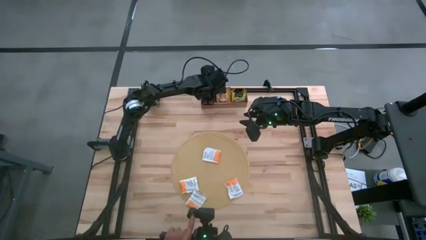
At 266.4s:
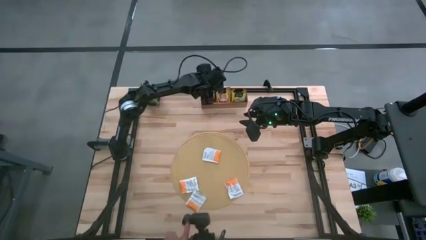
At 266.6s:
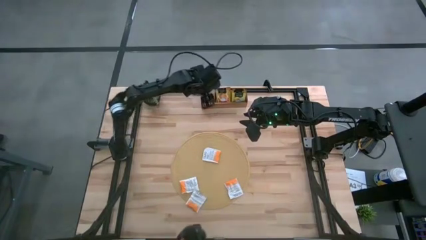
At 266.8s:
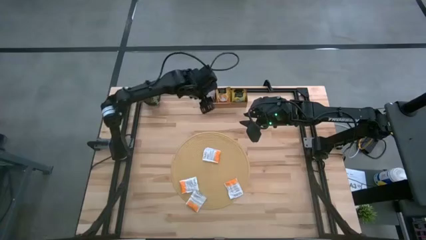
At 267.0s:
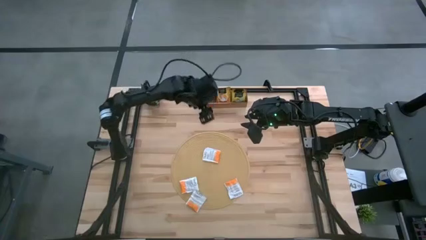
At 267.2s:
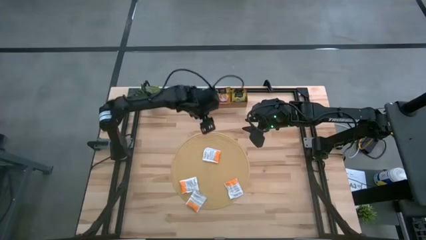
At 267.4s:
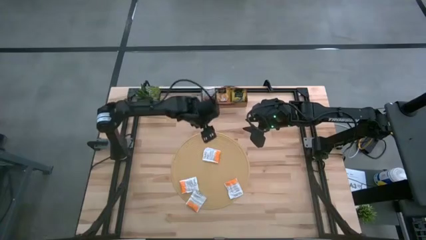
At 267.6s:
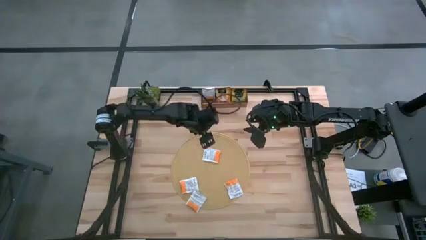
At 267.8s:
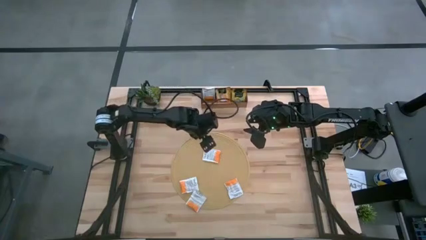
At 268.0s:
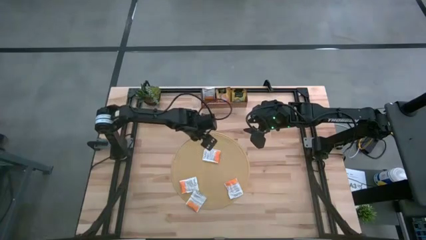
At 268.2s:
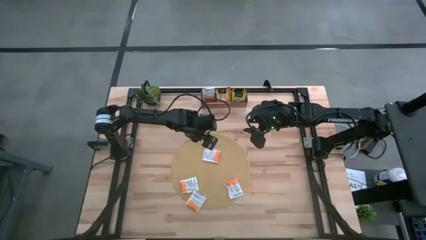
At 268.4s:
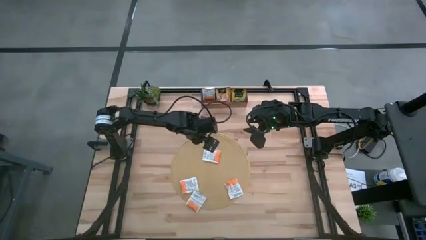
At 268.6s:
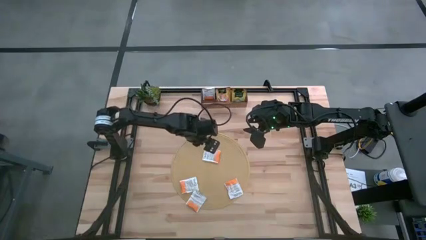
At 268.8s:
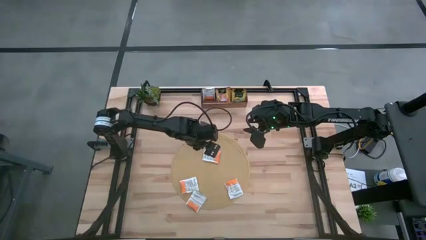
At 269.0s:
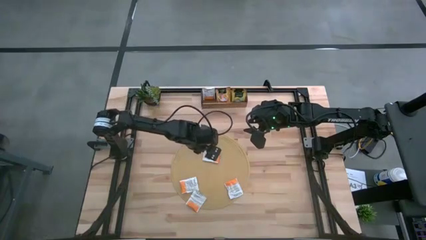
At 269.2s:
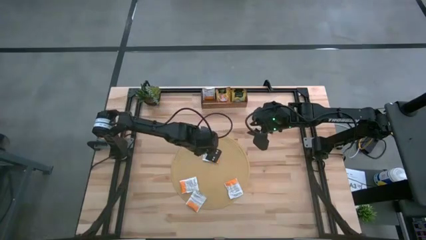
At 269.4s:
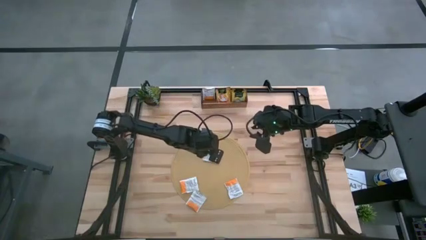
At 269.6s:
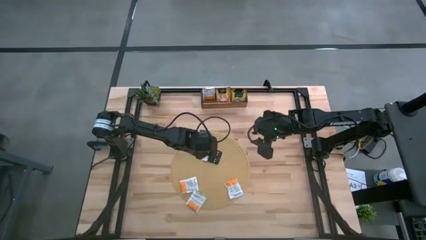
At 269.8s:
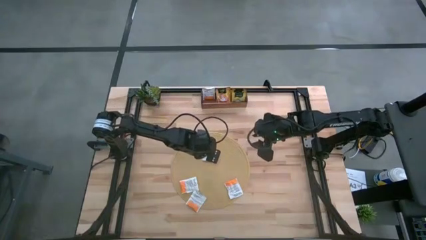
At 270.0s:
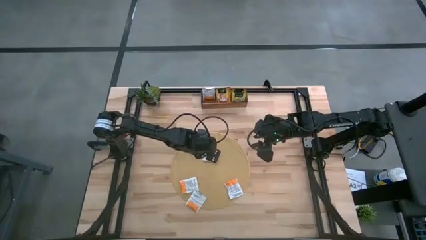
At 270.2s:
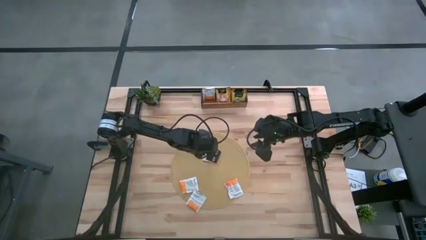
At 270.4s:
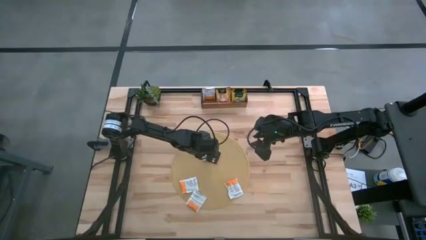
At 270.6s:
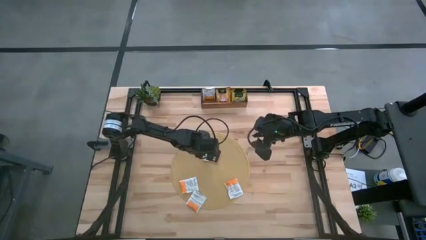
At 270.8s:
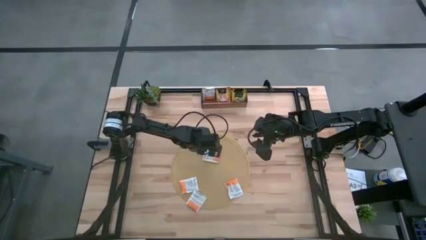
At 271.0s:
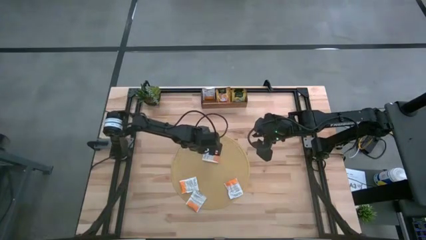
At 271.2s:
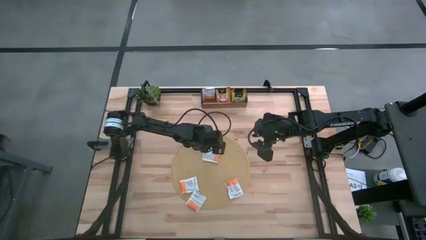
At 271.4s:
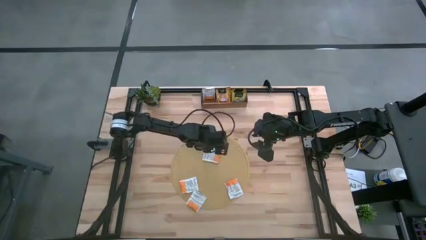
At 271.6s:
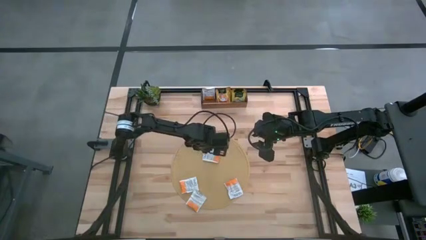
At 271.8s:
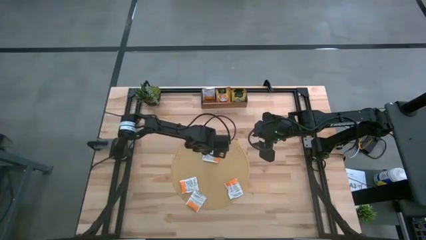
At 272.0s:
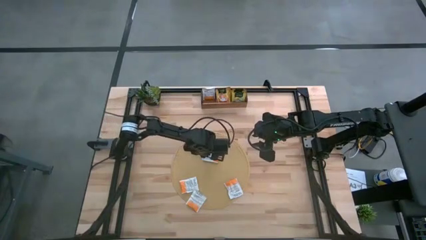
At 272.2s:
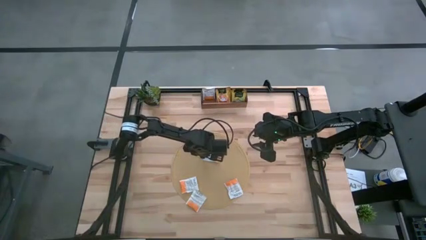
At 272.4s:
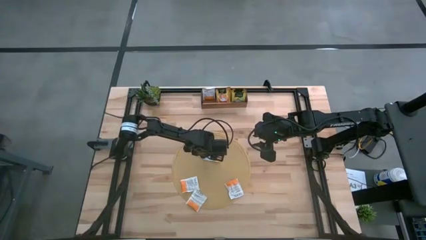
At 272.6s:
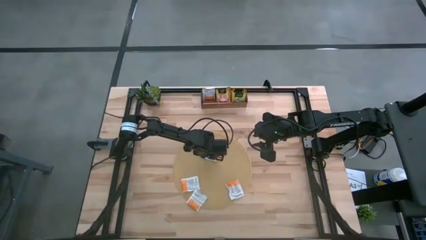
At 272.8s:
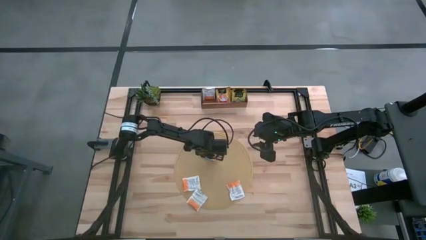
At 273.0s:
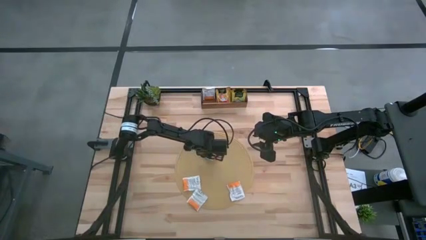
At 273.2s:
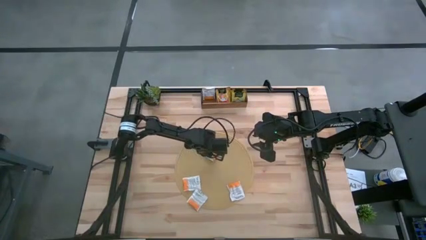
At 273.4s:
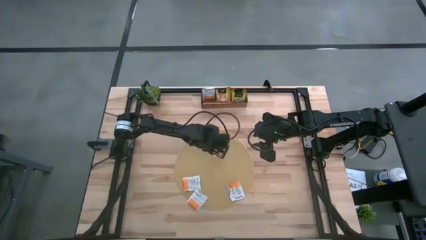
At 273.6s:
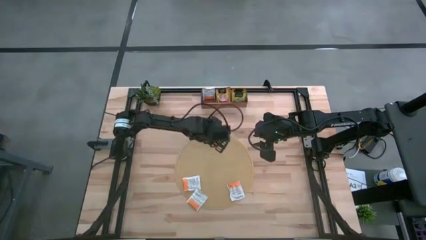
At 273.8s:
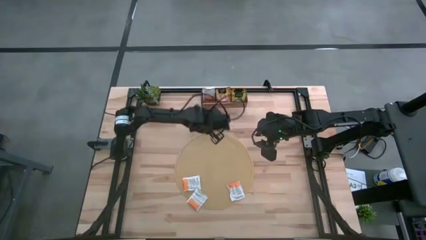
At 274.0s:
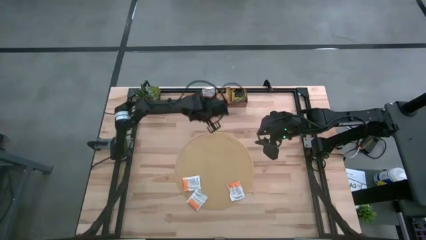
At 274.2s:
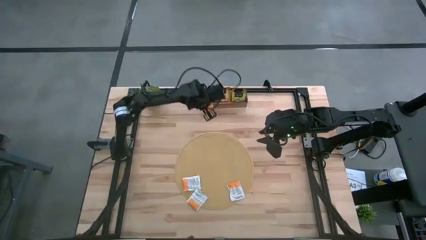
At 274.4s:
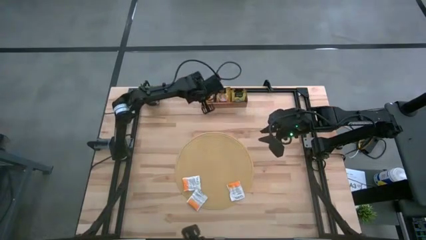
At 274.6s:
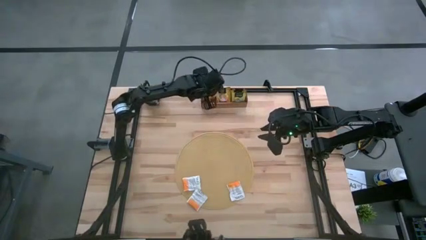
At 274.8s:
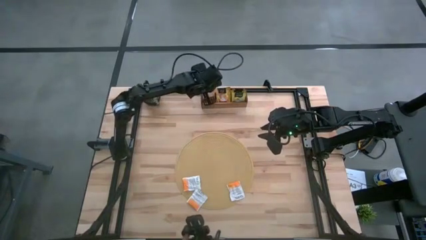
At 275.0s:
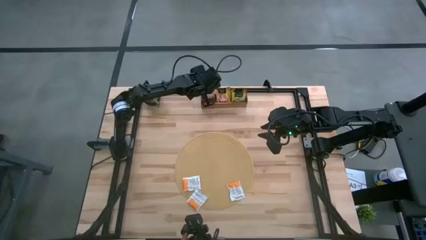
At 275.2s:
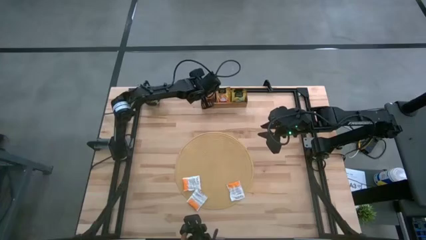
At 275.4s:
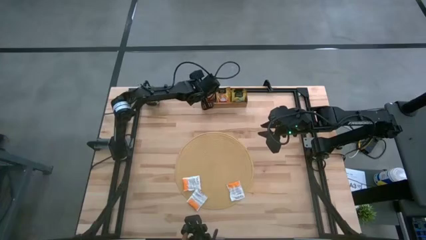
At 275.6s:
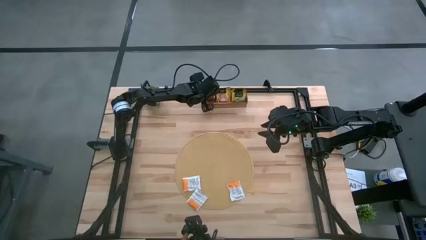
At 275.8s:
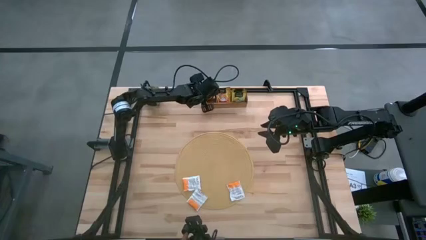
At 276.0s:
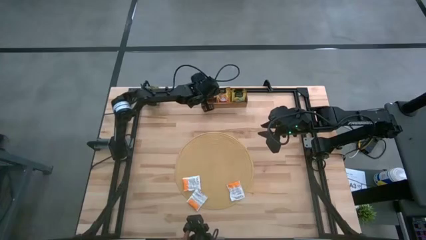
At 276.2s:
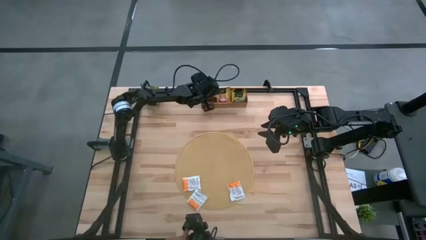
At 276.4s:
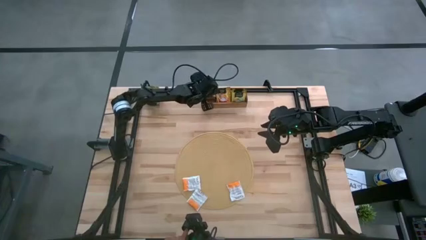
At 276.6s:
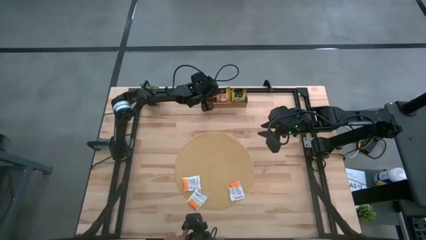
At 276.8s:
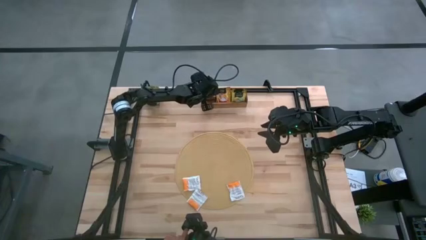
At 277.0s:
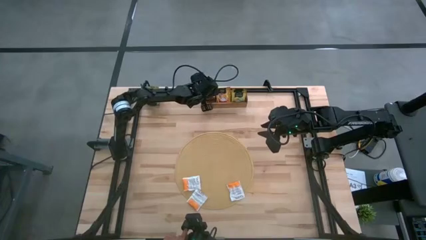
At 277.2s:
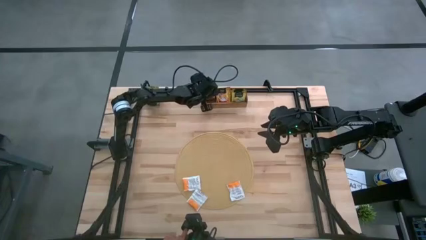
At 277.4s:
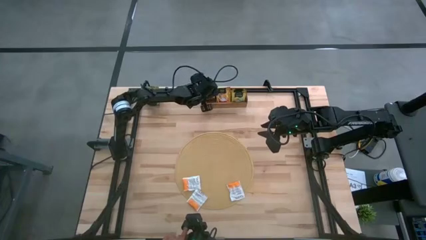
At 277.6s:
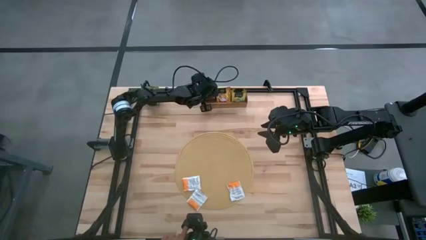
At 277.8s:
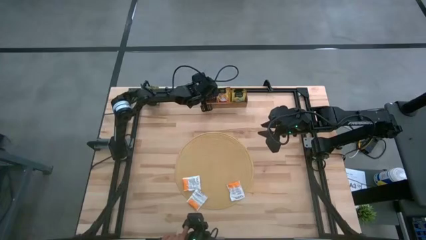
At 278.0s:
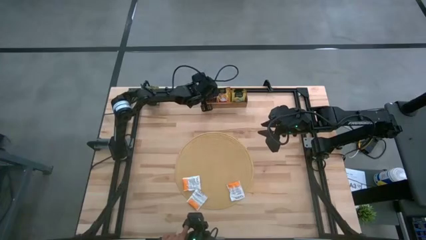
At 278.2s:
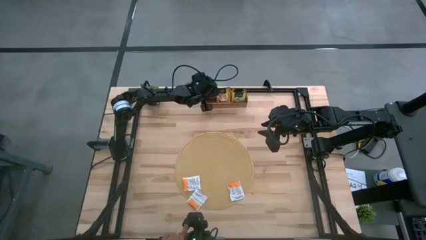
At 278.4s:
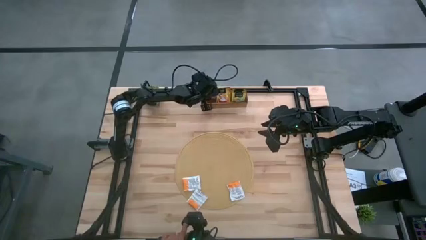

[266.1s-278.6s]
Task: Pick & Place Tea
Put the orange tea bag into the left section of the wooden organizer

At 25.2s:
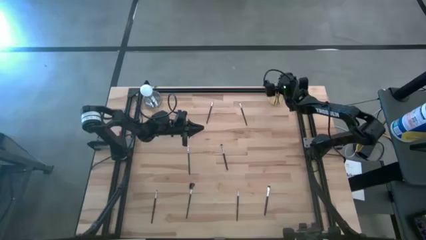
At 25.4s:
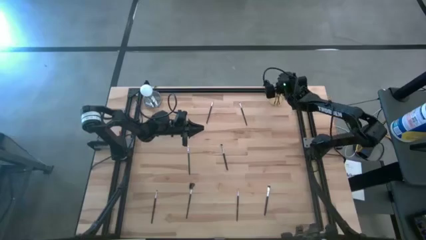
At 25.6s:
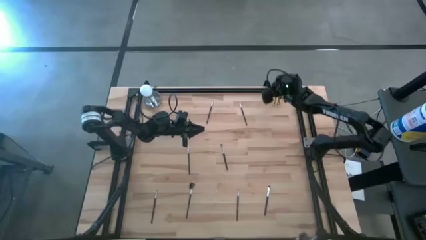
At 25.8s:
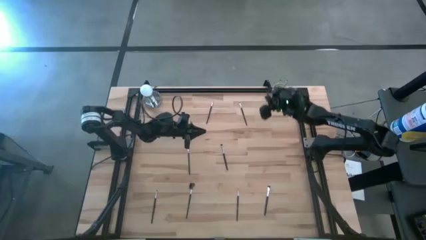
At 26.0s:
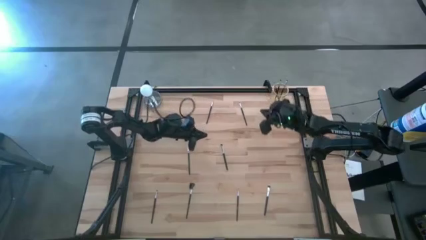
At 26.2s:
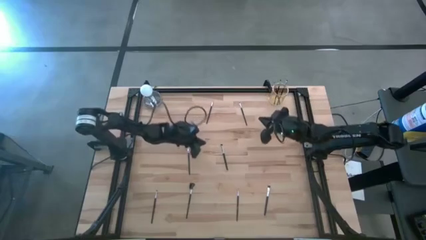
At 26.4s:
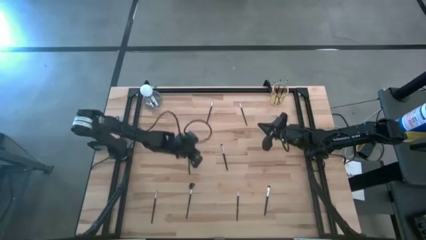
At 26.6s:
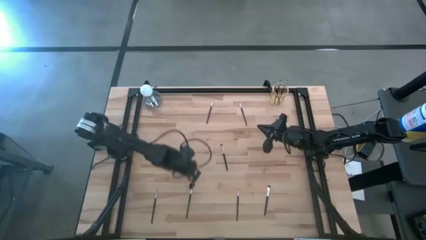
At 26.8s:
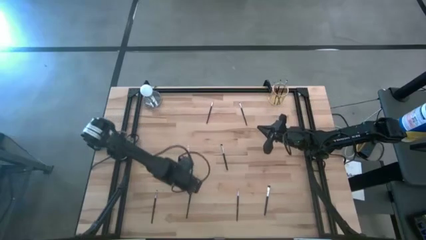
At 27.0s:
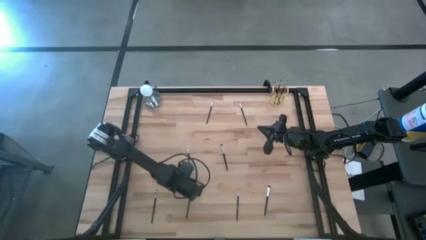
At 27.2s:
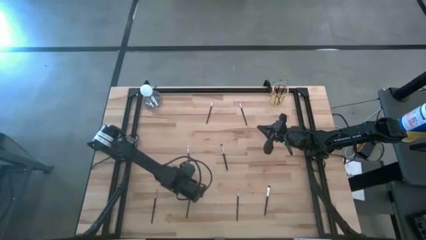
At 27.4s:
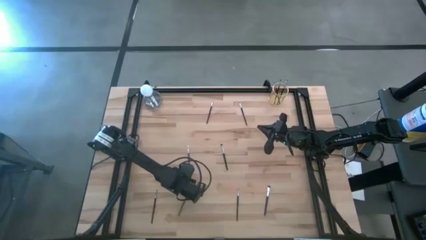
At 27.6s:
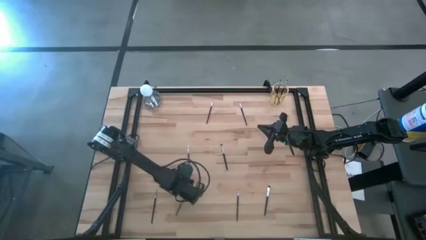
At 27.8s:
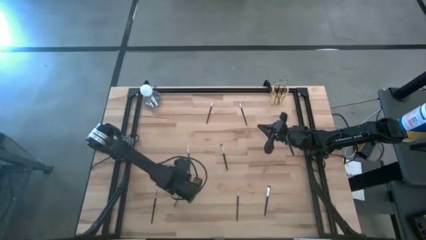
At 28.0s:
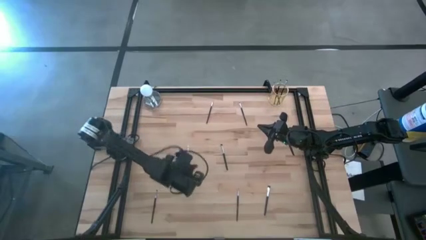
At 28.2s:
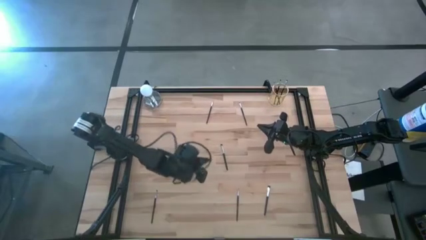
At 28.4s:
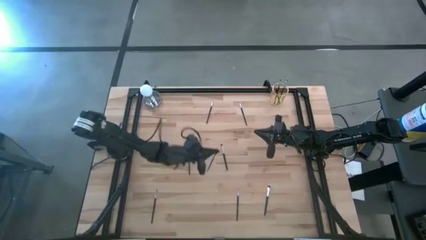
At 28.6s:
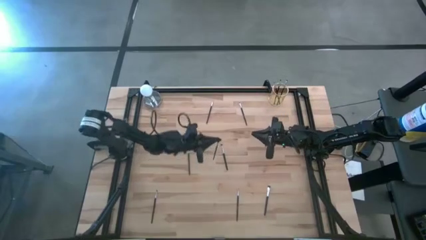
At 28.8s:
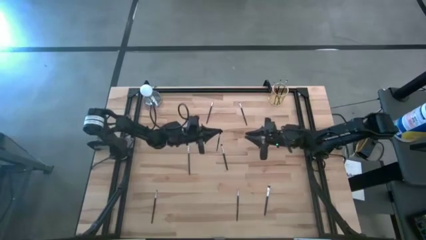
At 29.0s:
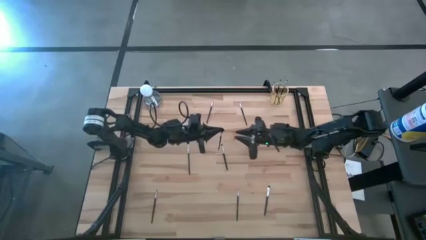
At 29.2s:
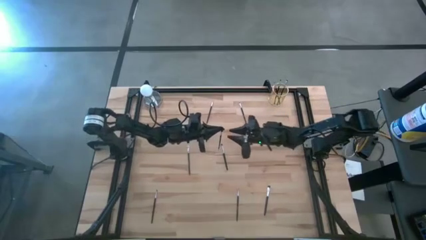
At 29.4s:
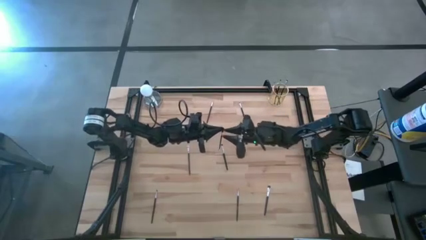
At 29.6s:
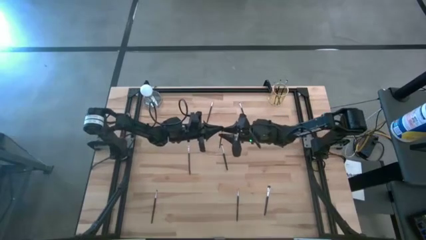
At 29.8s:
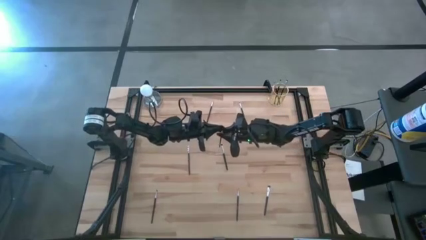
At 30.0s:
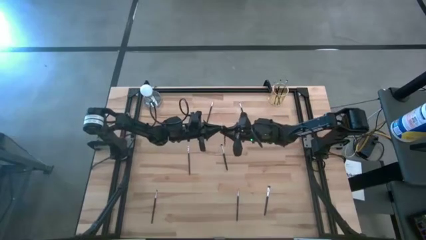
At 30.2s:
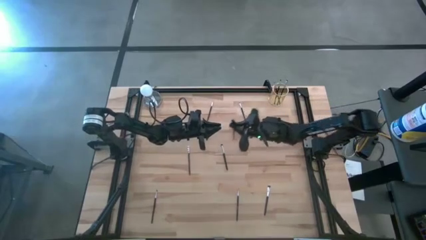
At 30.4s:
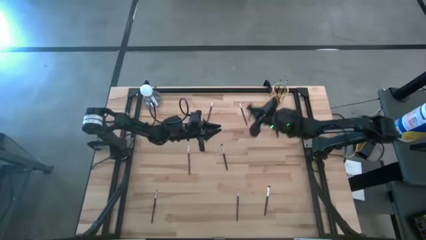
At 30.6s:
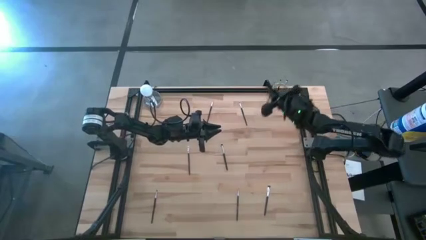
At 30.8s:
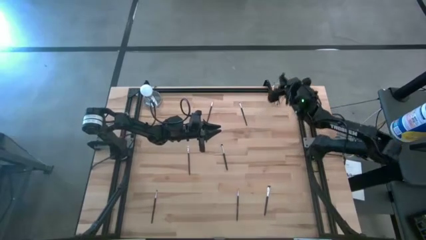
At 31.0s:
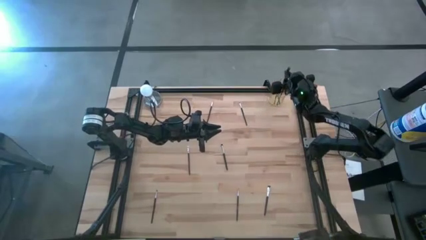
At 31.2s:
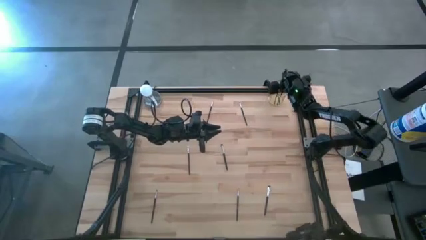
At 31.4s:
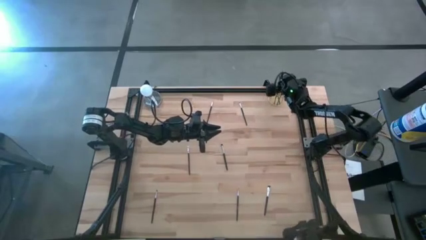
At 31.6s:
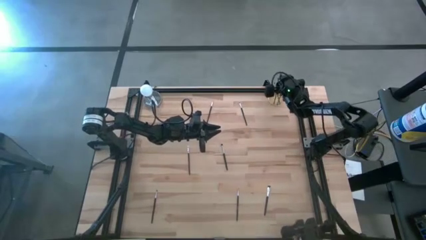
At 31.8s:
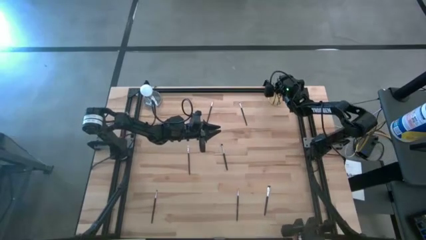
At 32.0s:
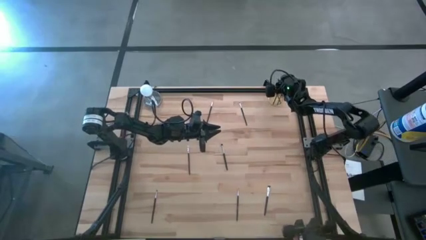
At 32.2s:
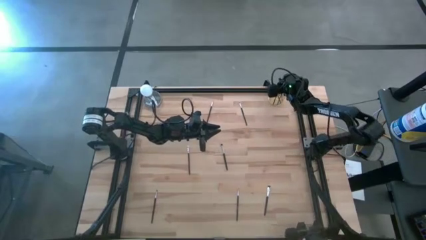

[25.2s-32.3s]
Task: Sort items
Put the brow brush into the gold holder
